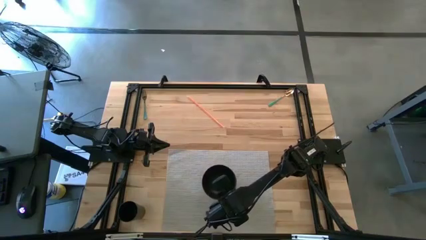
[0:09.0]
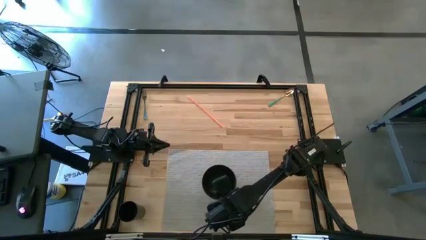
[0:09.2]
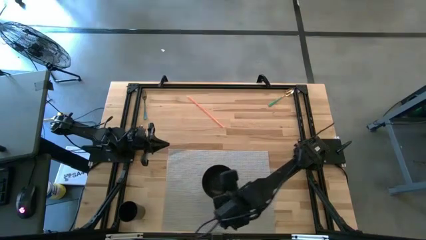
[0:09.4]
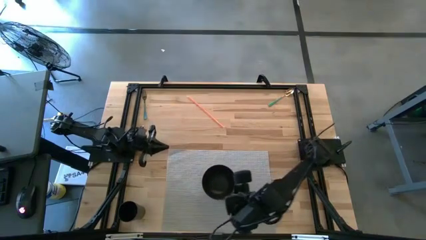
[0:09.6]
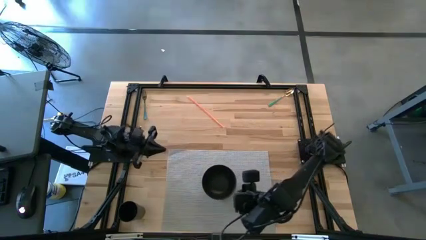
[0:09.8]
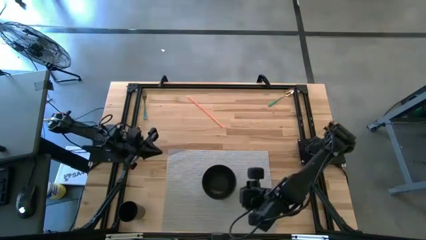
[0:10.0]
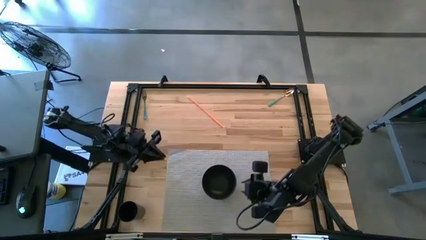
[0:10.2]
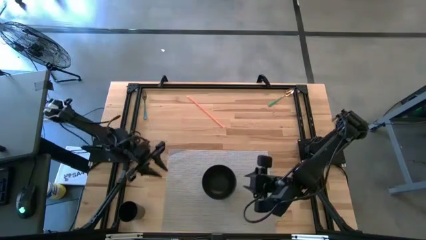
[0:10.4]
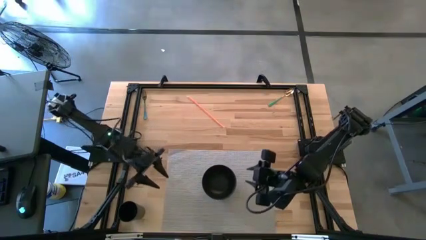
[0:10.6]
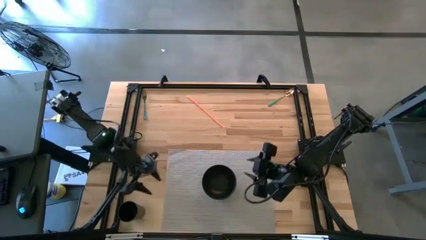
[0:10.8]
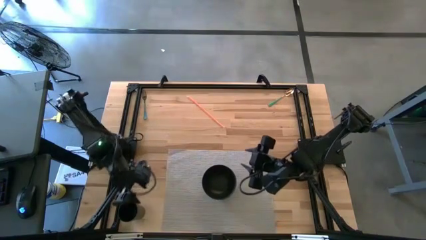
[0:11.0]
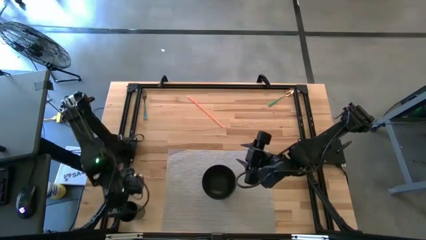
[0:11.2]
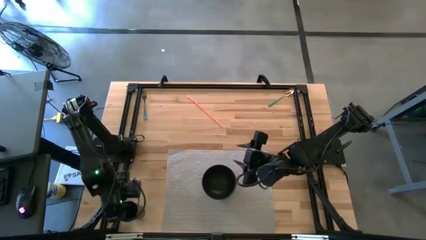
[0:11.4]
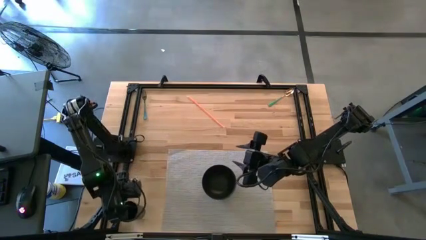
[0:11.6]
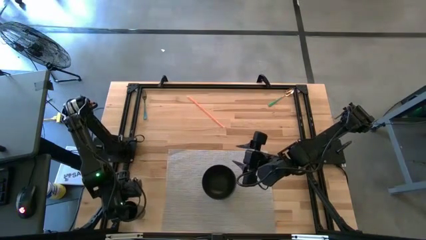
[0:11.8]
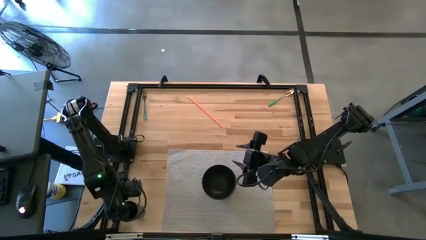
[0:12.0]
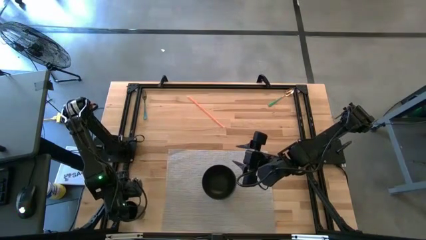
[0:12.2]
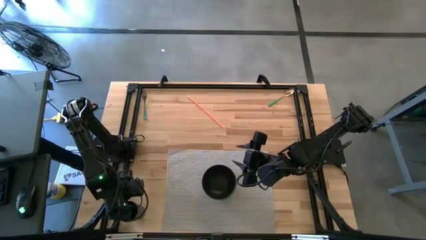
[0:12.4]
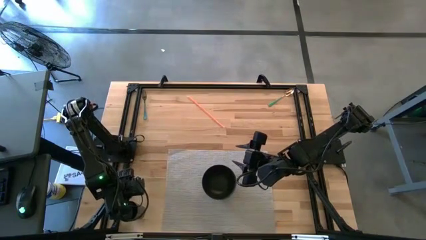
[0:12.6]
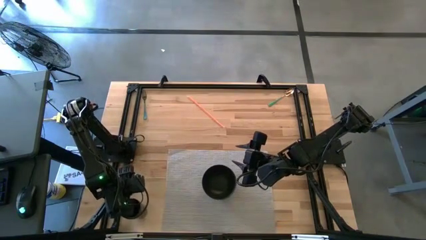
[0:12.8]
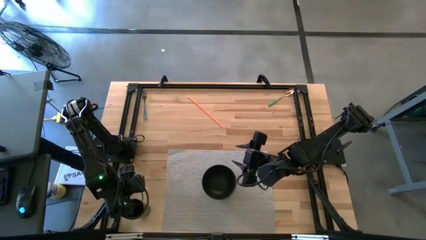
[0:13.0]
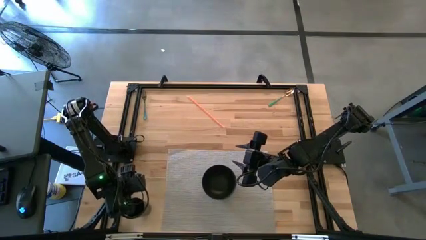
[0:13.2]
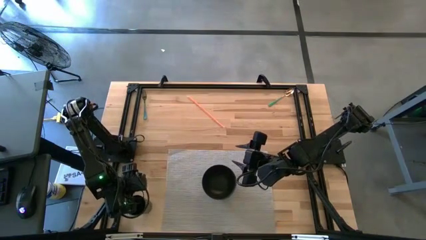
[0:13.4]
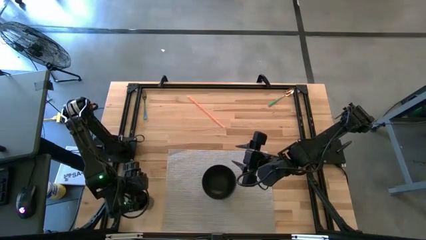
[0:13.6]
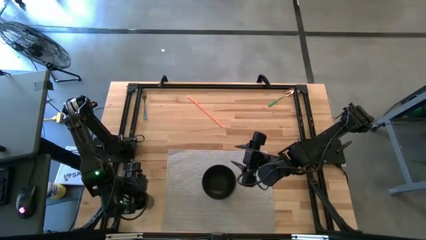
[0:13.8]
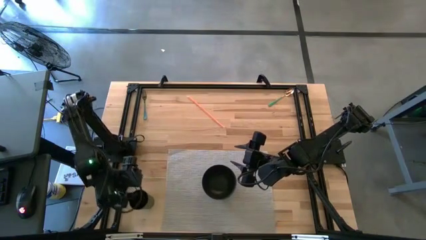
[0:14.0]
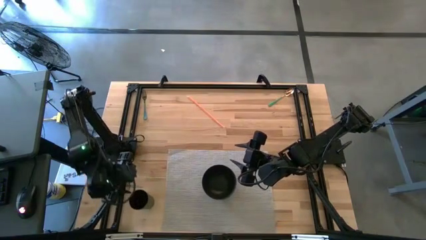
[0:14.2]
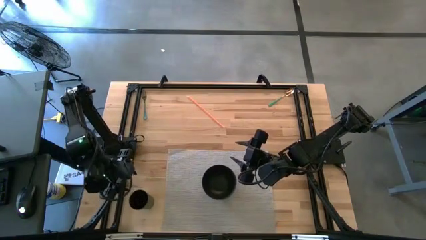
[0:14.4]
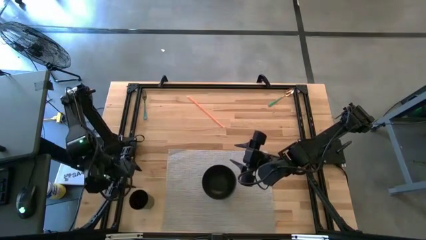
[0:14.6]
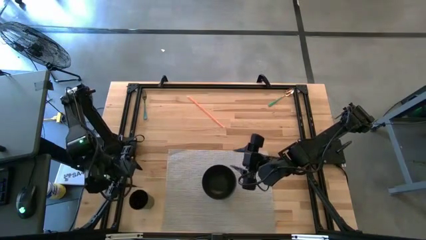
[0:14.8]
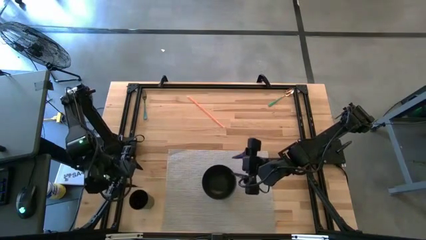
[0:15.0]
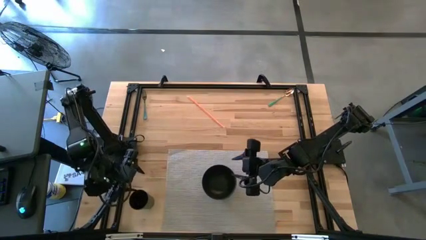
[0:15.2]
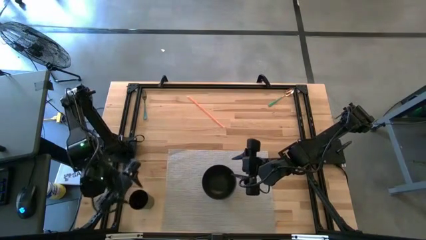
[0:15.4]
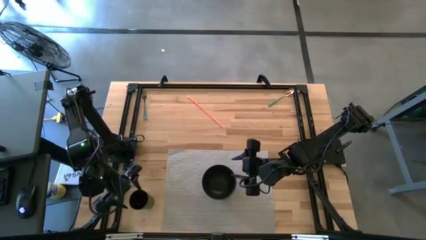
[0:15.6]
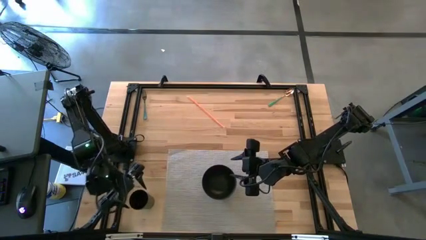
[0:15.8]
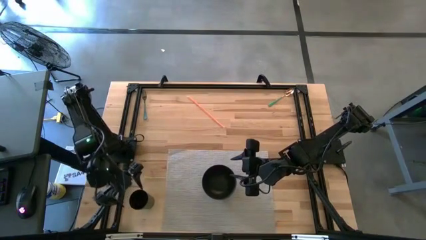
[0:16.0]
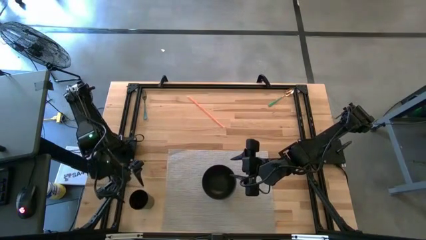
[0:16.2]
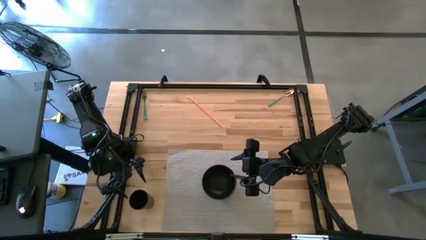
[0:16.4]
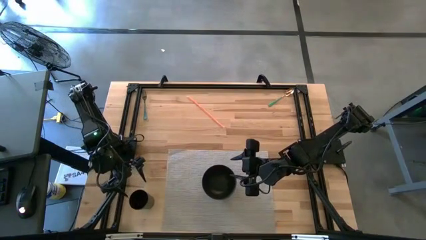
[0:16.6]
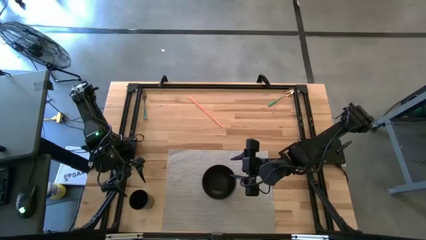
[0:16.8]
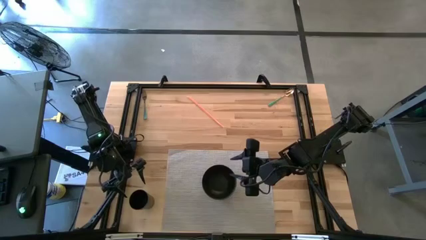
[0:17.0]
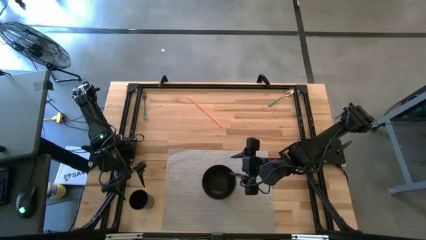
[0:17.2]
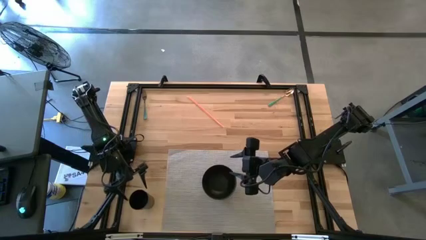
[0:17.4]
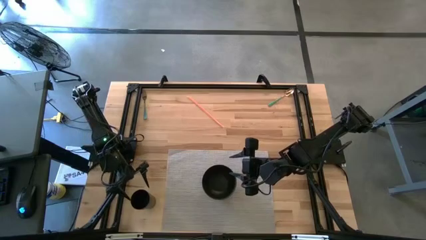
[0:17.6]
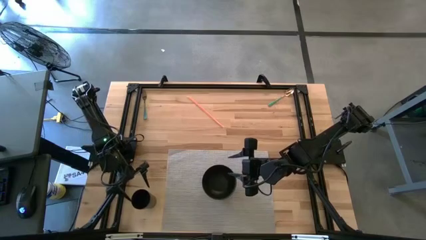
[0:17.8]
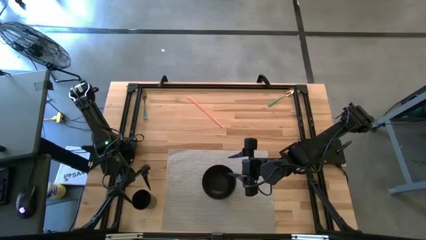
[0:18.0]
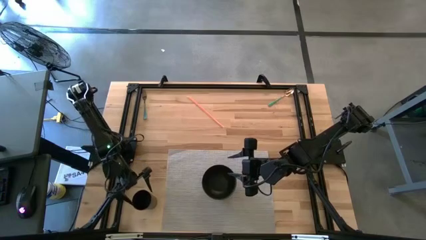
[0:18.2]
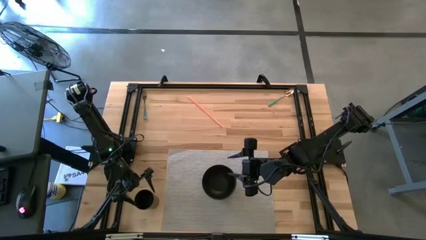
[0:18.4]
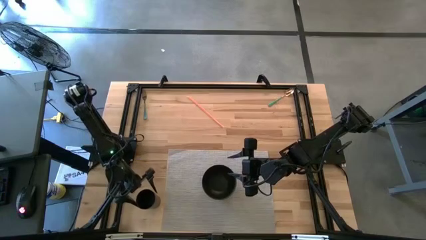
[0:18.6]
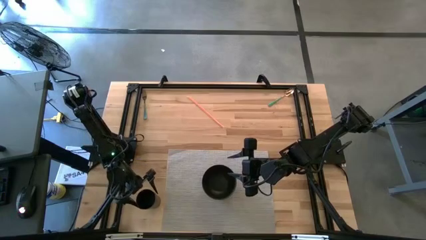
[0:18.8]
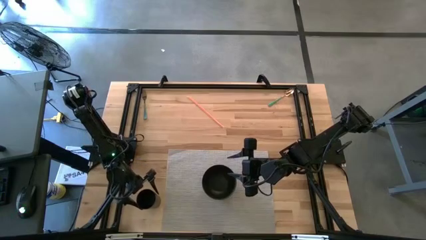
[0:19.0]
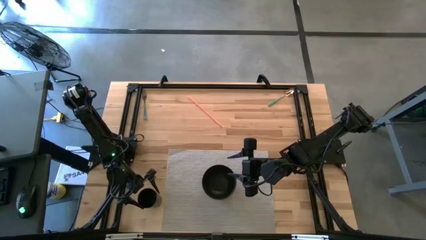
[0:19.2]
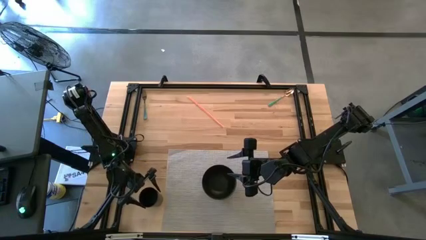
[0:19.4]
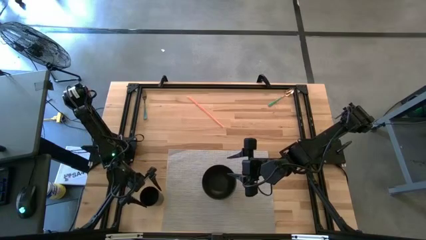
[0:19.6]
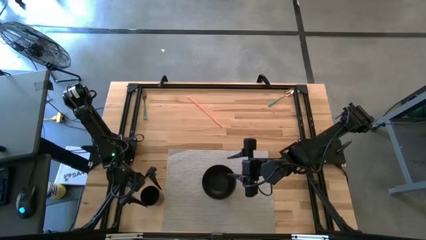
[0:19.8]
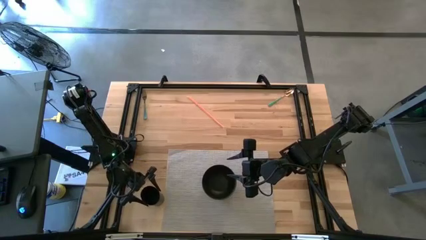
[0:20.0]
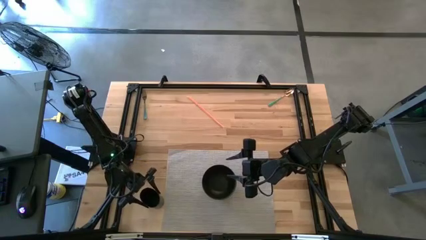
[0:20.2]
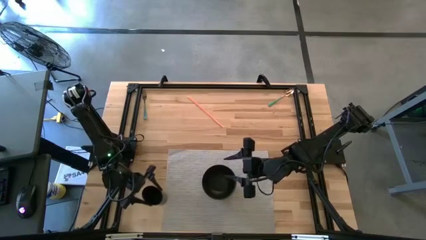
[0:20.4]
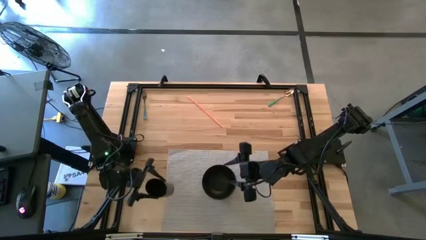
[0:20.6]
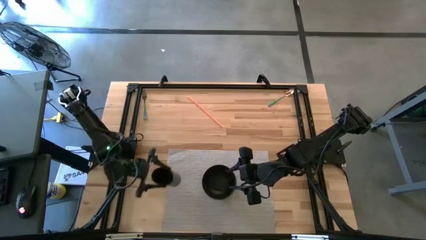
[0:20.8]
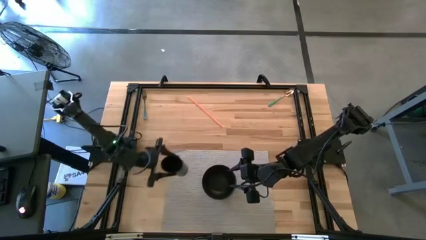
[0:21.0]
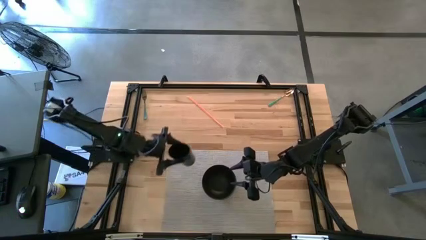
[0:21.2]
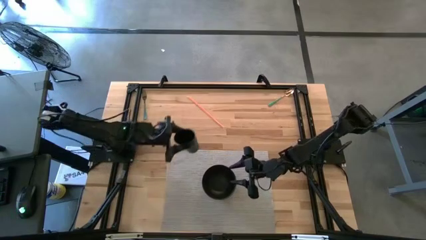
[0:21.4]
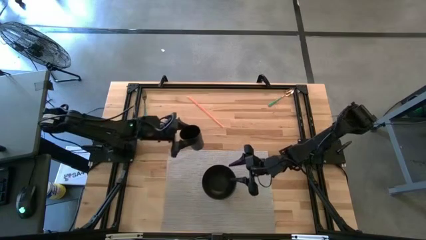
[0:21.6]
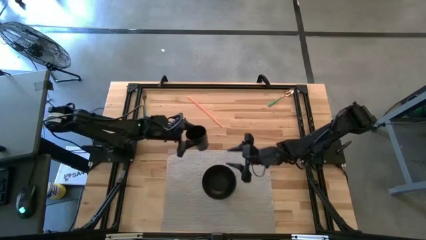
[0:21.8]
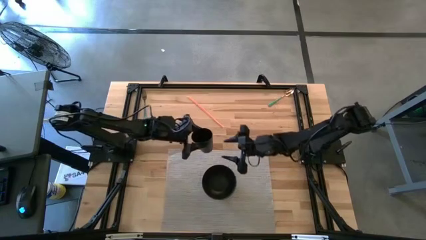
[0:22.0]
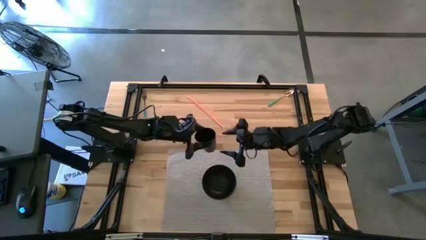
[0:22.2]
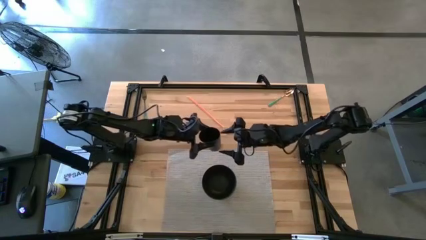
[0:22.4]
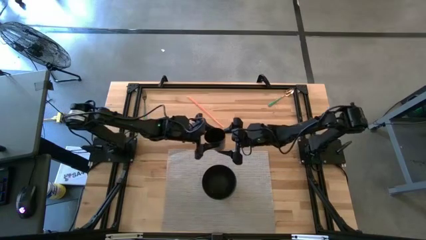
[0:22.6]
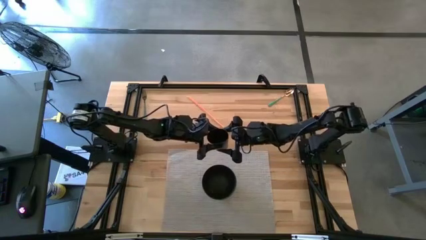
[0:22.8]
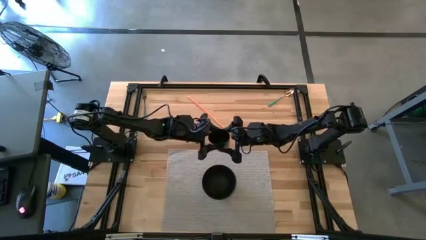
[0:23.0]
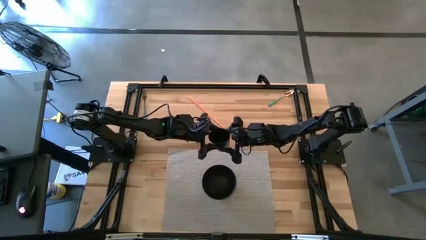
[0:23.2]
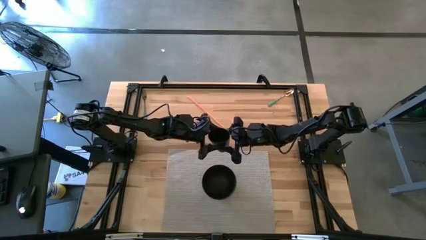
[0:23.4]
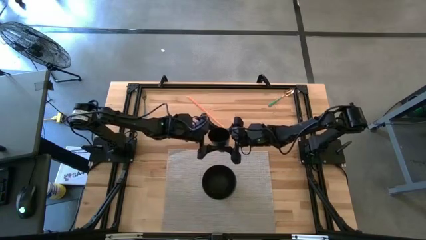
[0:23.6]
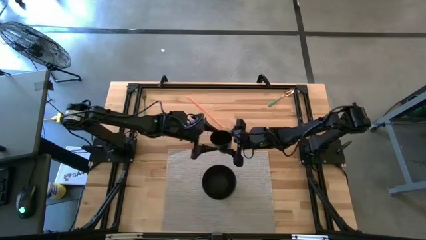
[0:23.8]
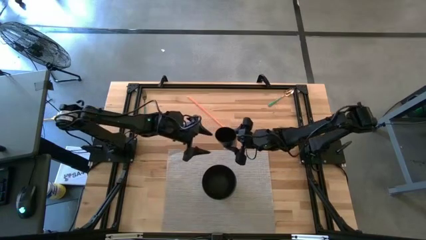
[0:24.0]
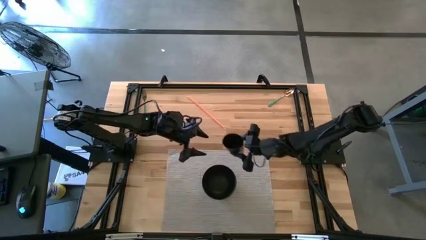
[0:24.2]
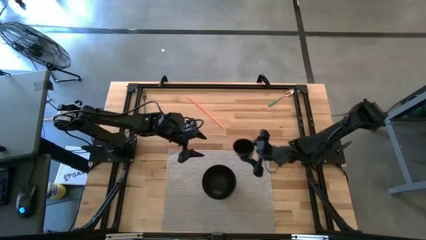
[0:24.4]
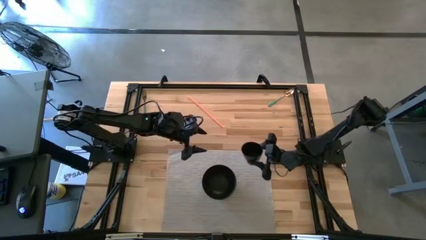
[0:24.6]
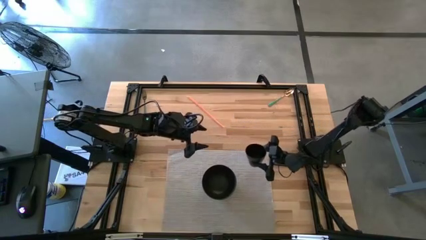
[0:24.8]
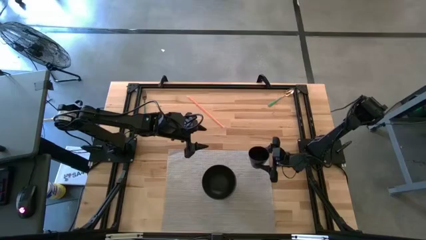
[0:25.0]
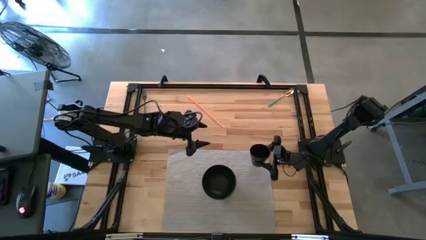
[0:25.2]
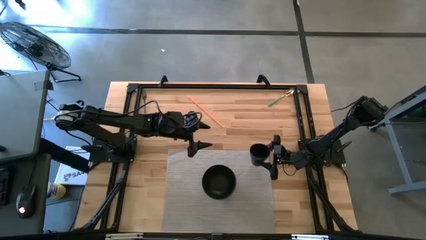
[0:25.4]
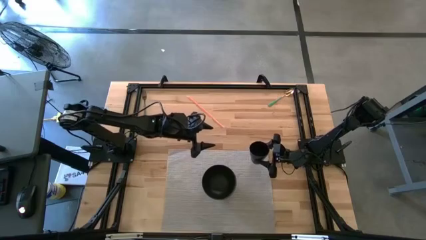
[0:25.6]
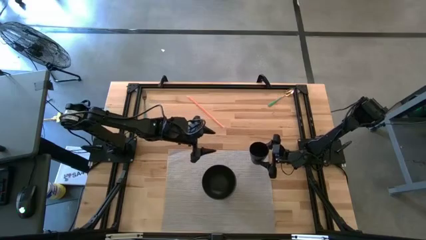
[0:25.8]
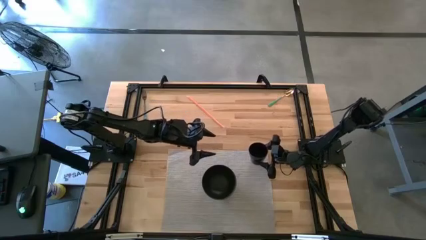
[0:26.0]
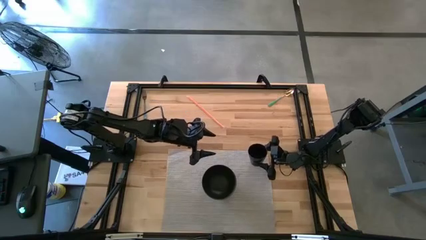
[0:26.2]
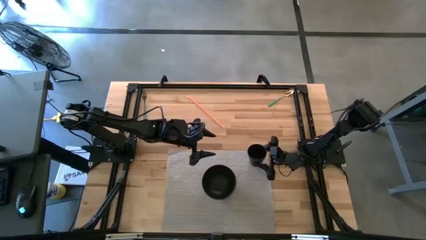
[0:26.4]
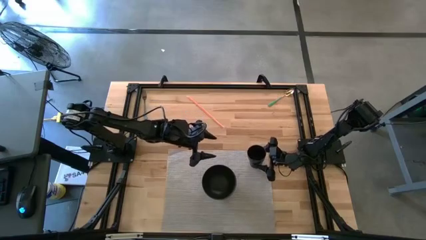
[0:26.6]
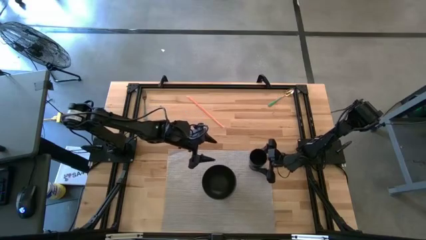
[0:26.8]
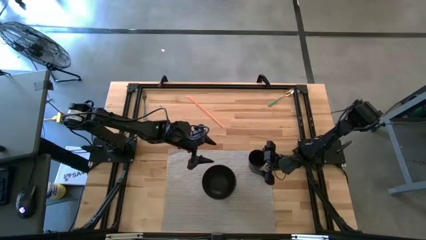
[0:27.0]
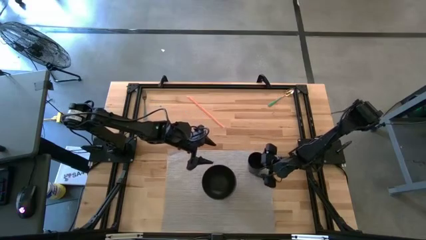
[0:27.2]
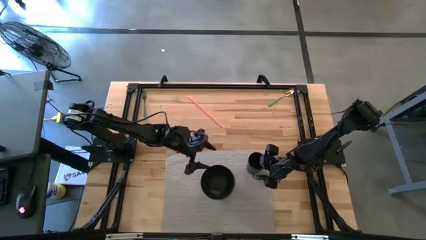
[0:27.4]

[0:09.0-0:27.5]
Task: Pick & Place Utensil
Put the black cup on the table mat
